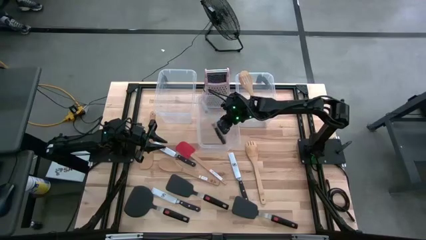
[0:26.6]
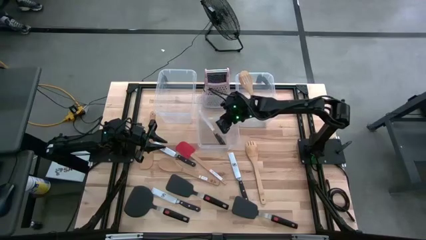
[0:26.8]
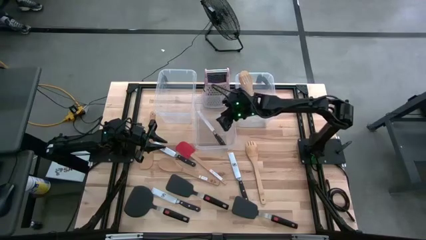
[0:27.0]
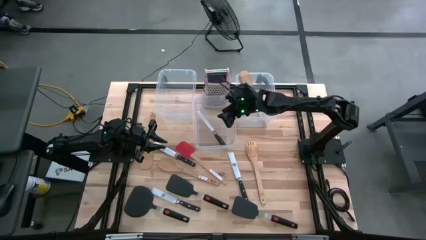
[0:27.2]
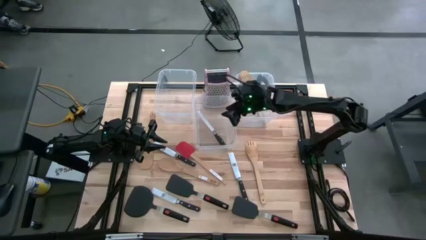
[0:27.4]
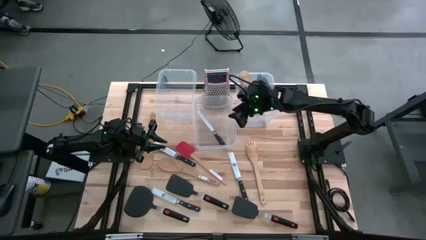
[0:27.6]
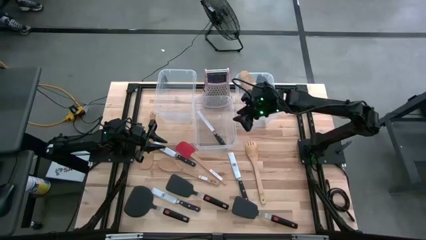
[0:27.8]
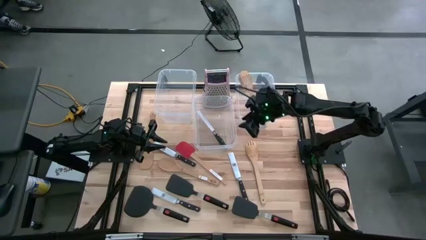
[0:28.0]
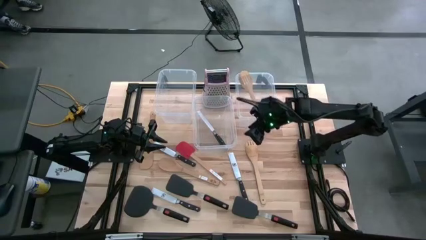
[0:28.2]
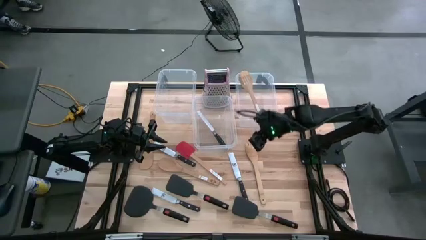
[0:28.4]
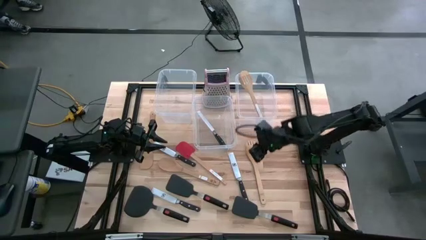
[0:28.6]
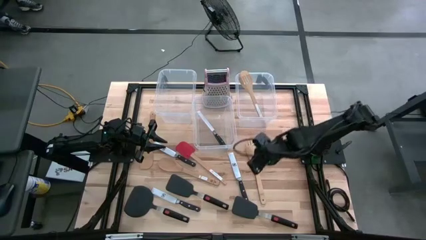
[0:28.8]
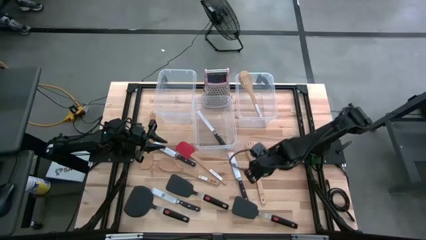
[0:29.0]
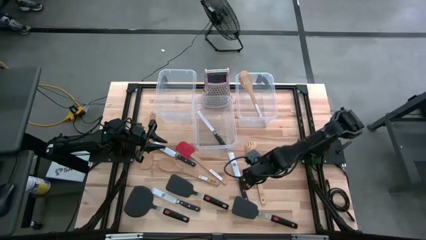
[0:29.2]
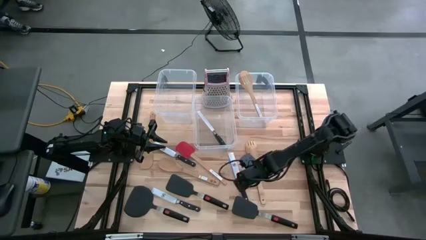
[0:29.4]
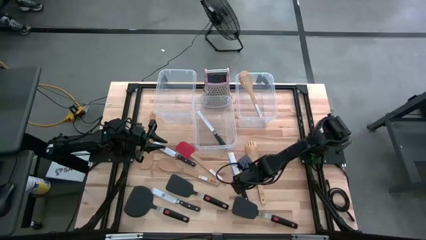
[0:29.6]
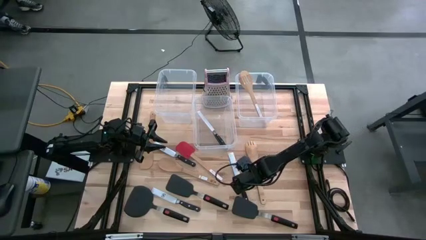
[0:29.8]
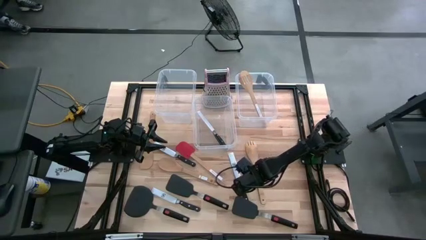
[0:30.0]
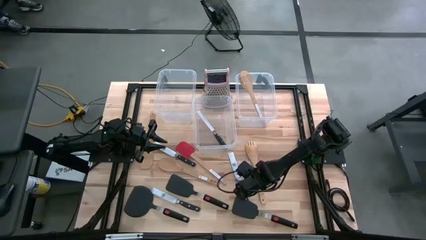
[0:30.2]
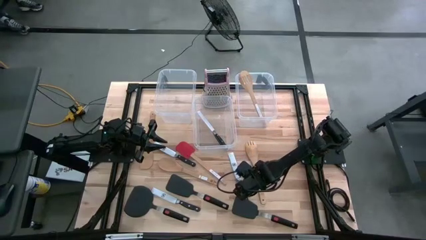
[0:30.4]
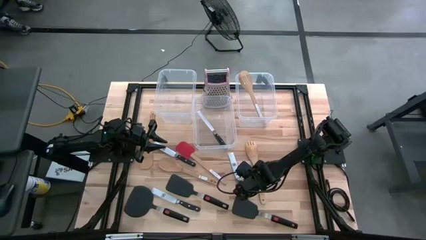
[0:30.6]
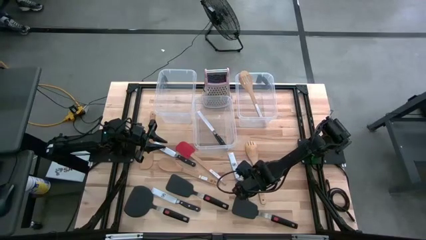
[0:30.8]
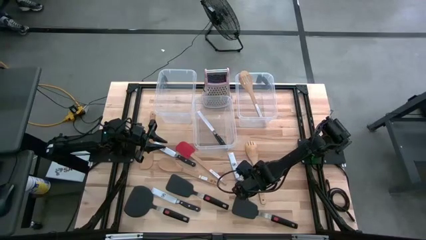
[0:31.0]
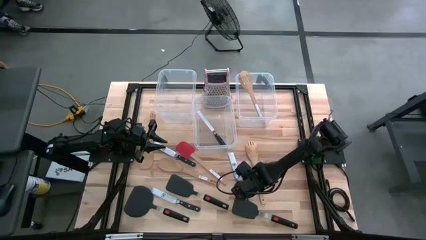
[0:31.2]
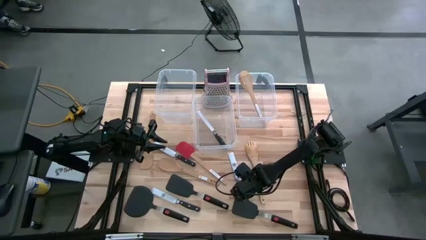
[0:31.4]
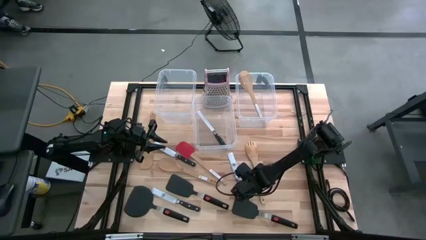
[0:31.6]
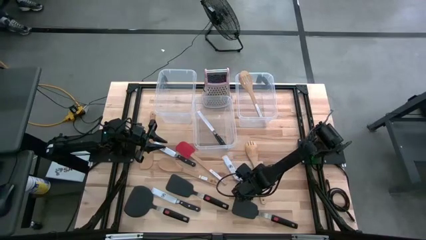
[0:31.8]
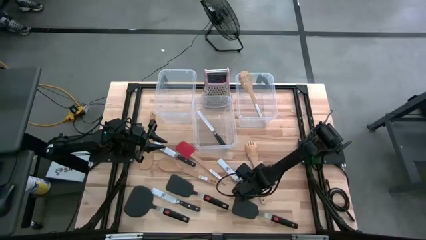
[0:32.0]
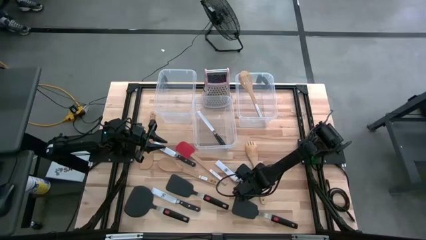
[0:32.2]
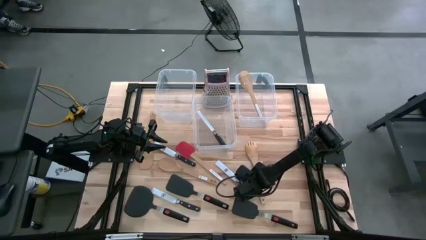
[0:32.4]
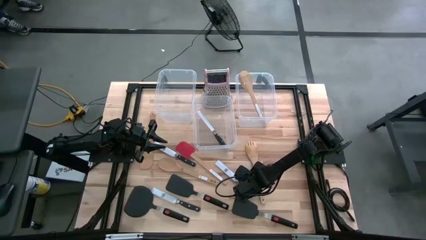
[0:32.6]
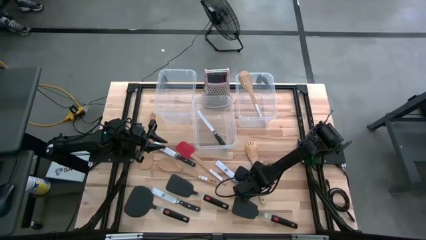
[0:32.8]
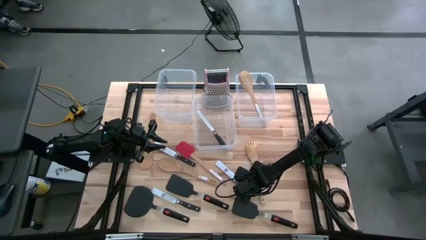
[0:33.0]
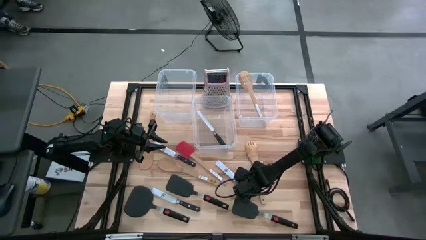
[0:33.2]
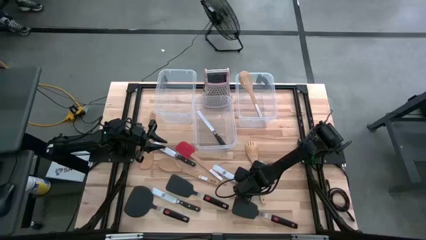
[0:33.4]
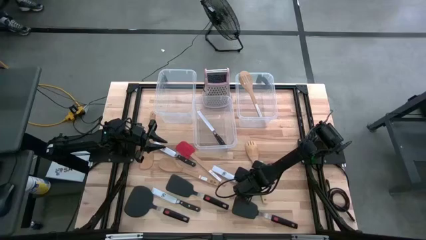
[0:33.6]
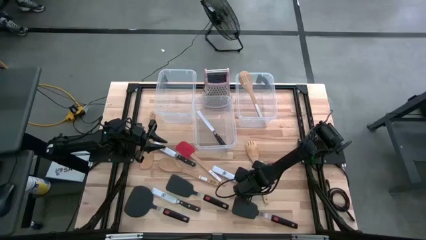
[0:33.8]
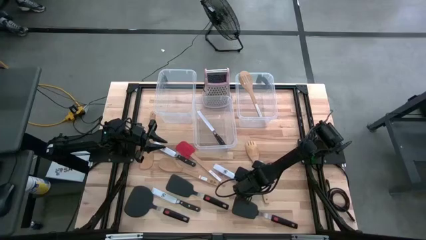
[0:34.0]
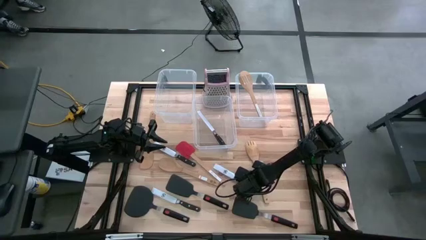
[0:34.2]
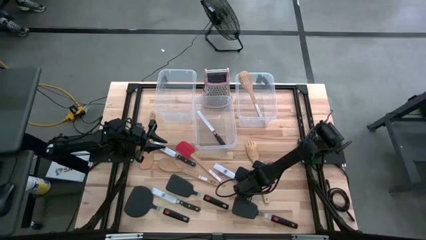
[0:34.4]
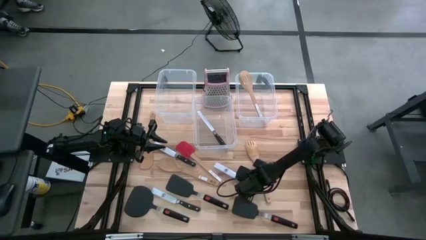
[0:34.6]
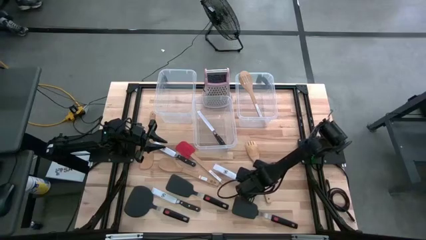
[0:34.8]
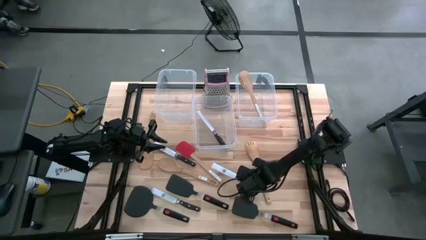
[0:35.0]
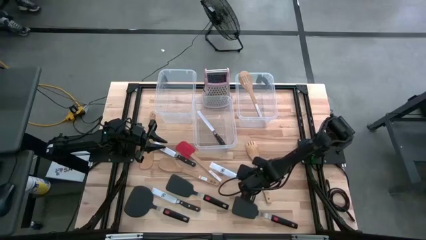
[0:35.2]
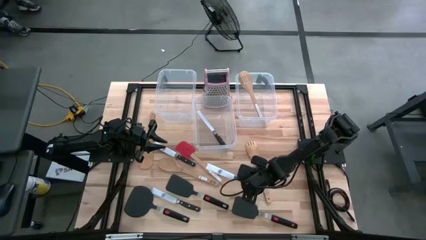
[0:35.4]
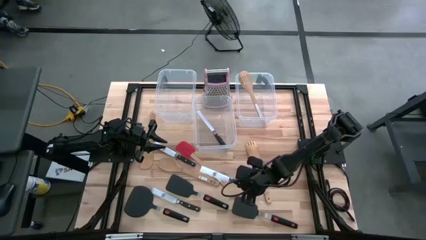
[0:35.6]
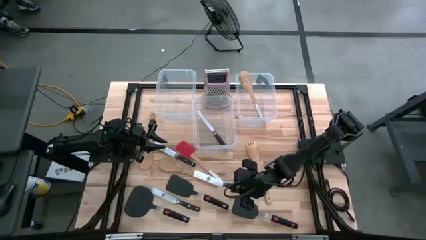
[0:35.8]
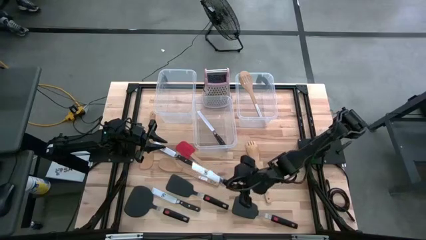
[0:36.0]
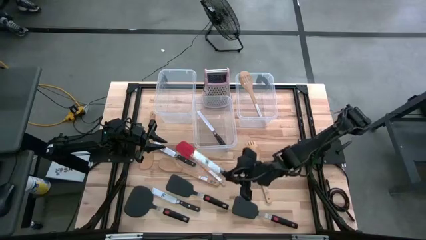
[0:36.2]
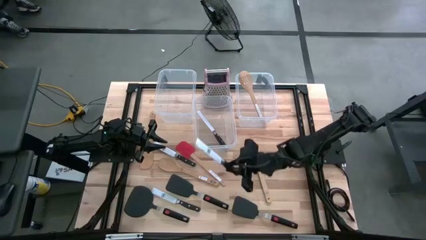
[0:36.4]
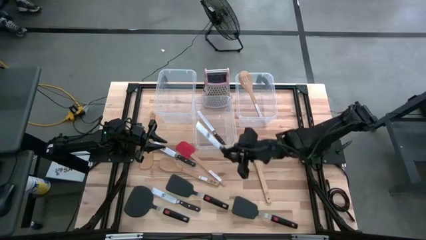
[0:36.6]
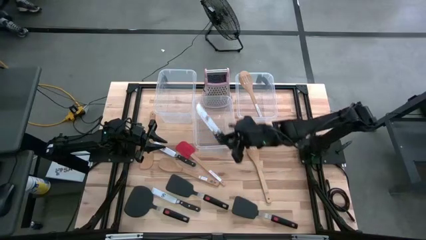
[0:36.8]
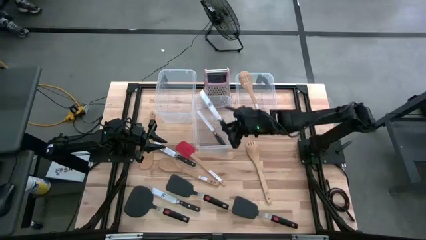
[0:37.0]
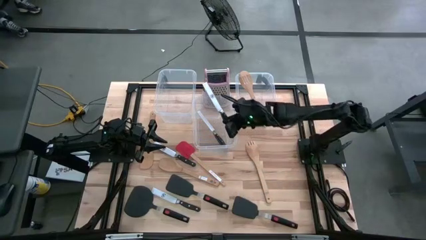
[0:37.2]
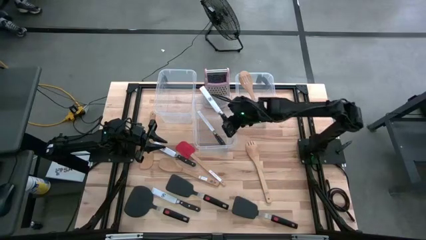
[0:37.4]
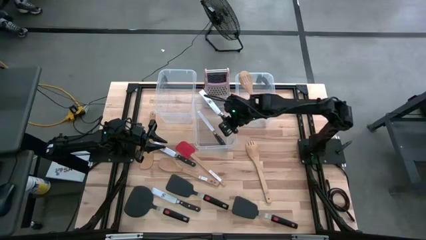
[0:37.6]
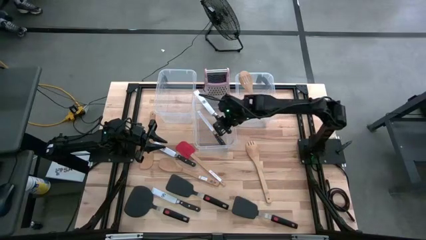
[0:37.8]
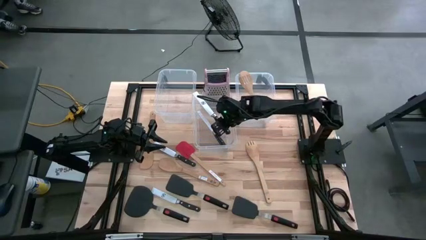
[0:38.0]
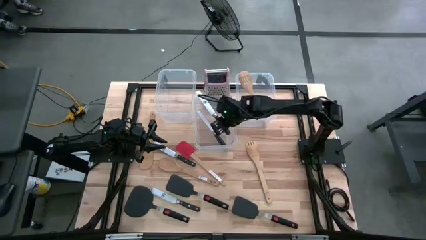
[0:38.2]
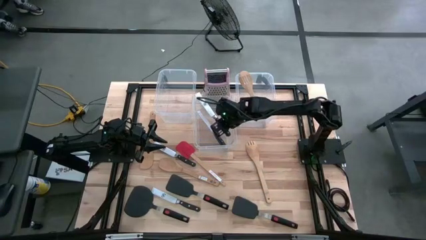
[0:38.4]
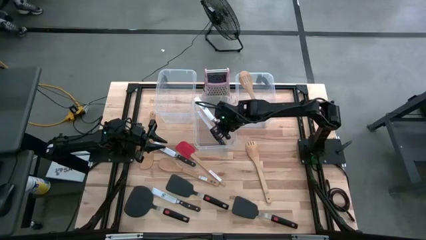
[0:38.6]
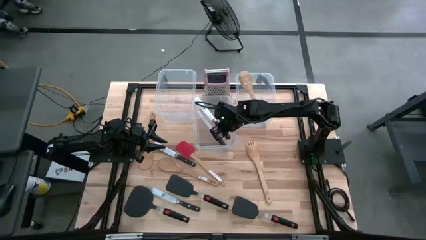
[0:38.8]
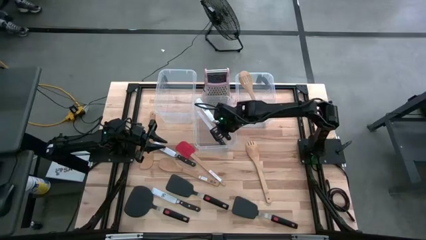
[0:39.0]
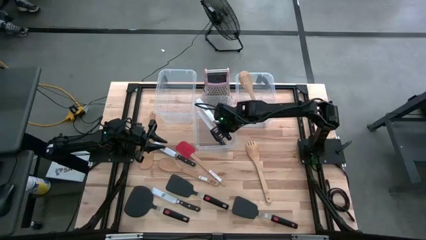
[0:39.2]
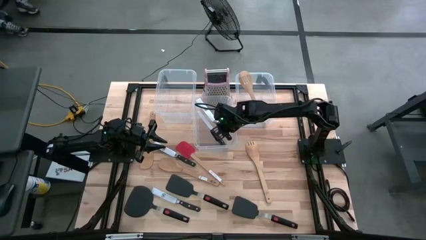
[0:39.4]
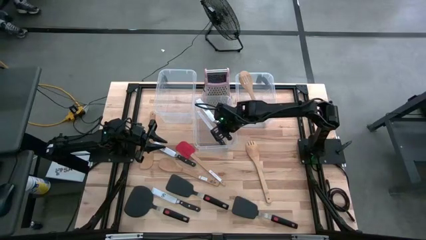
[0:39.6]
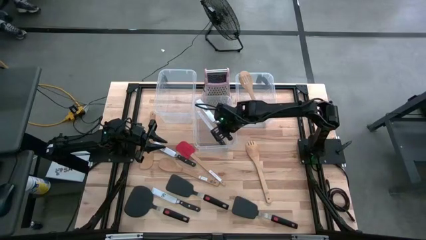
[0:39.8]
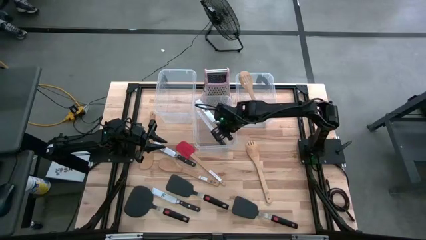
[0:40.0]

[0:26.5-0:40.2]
Task: Pick & Place Kitchen Items
Put the black table knife into the middle transparent bin
